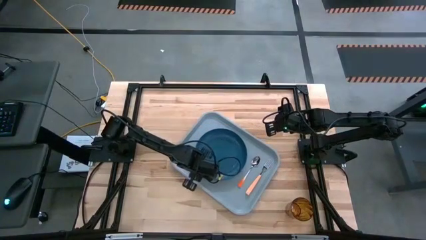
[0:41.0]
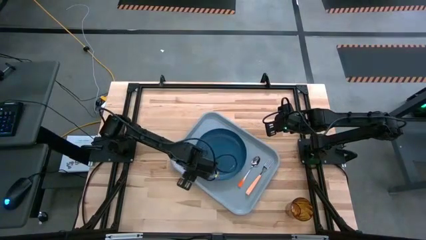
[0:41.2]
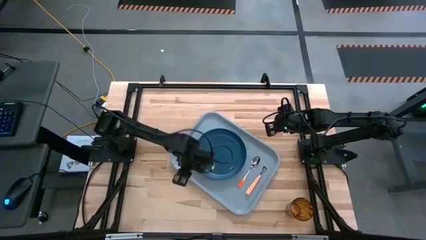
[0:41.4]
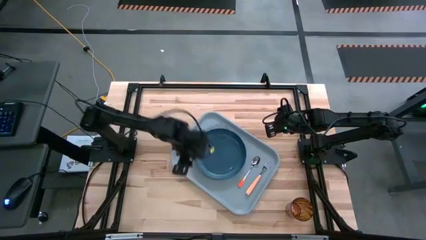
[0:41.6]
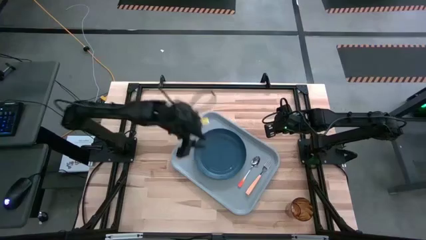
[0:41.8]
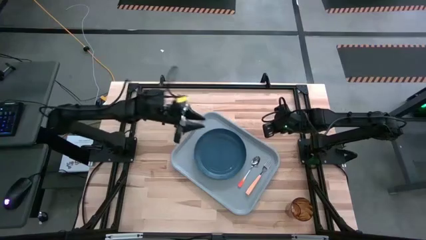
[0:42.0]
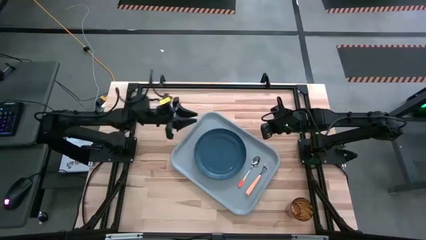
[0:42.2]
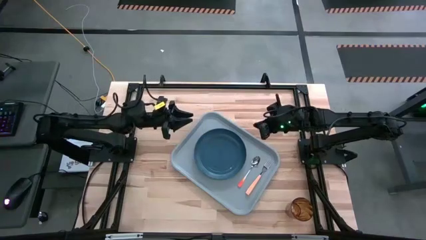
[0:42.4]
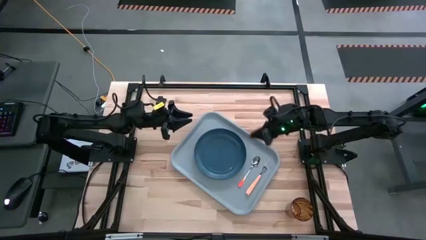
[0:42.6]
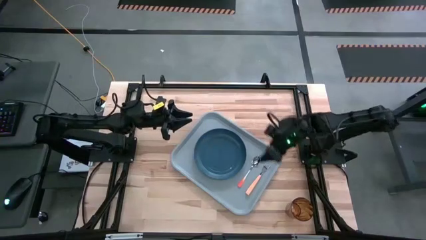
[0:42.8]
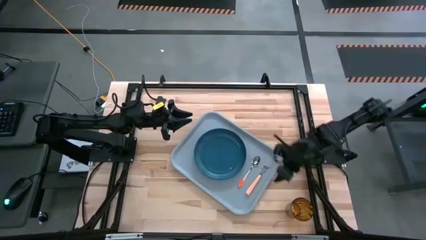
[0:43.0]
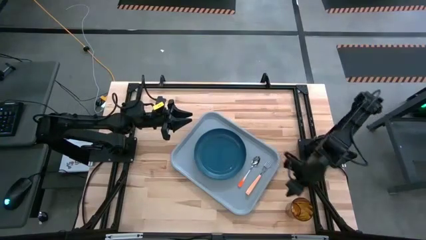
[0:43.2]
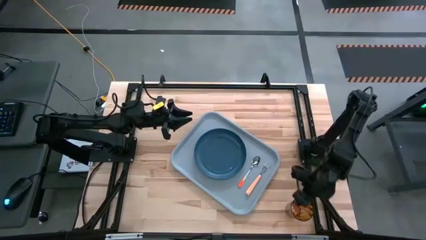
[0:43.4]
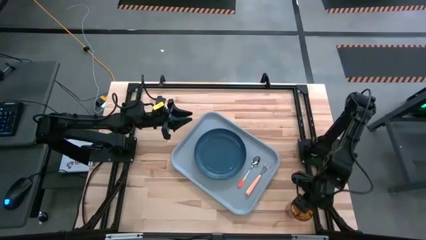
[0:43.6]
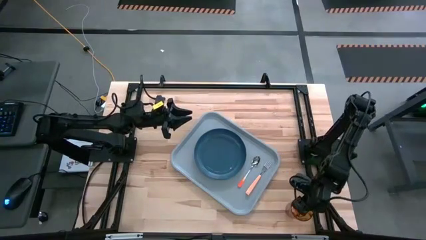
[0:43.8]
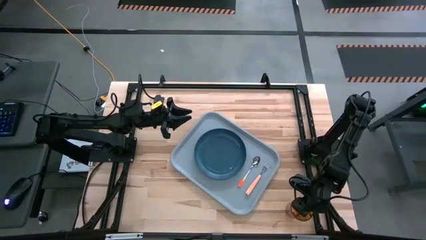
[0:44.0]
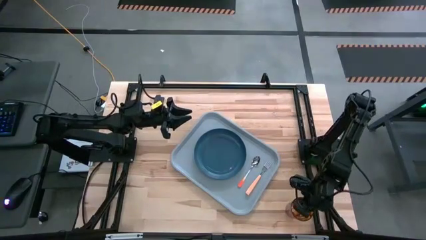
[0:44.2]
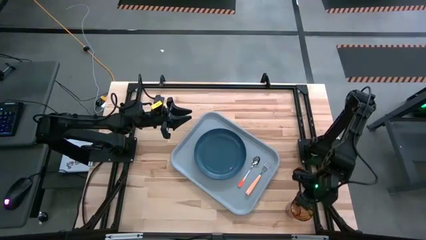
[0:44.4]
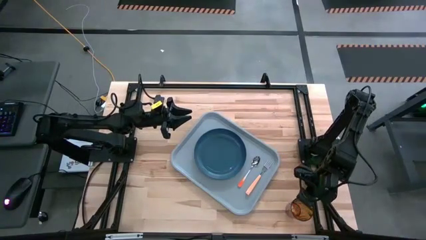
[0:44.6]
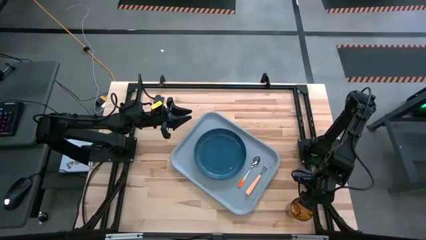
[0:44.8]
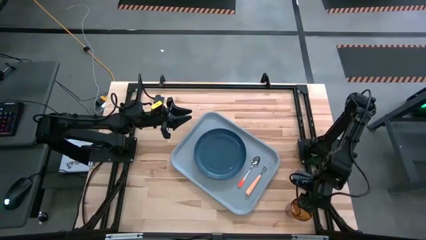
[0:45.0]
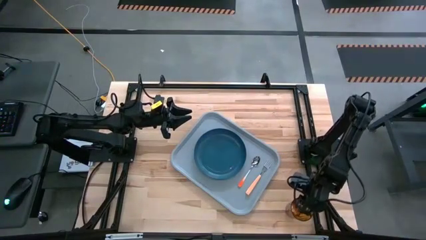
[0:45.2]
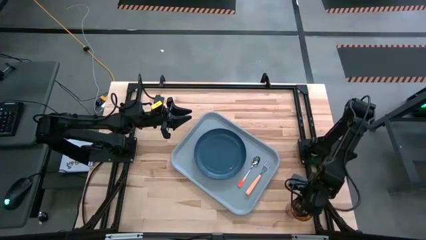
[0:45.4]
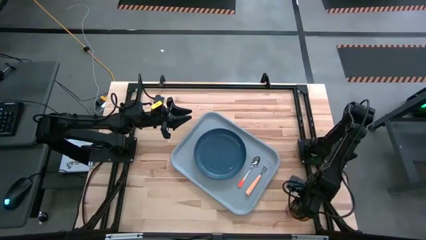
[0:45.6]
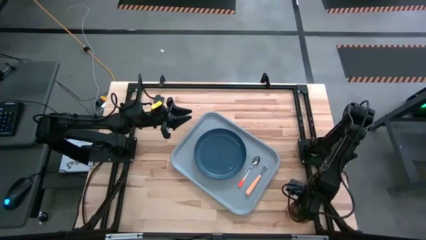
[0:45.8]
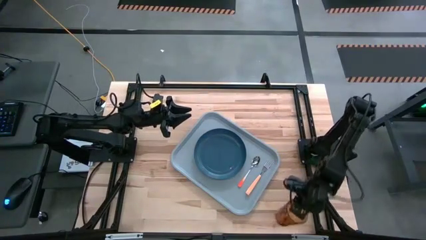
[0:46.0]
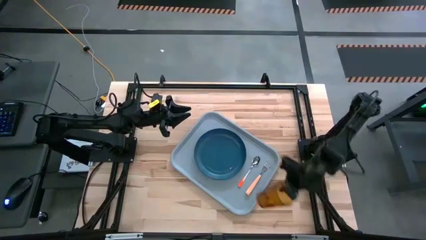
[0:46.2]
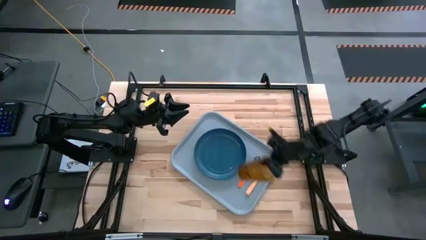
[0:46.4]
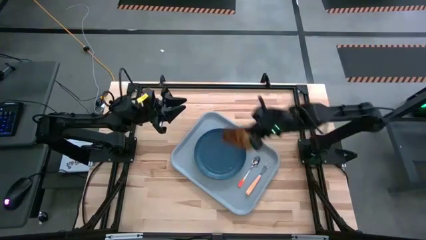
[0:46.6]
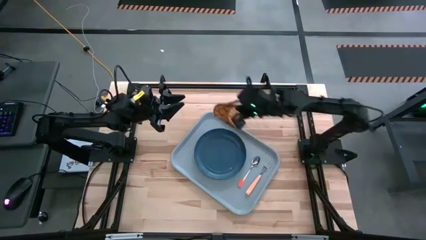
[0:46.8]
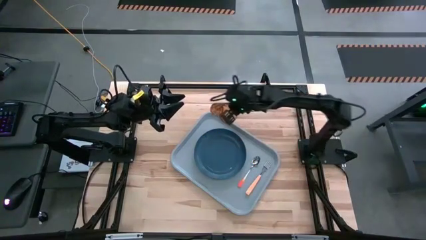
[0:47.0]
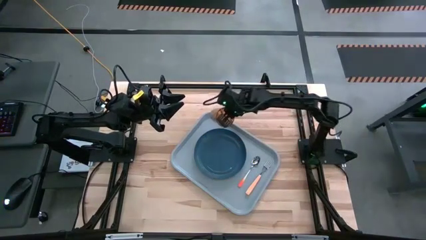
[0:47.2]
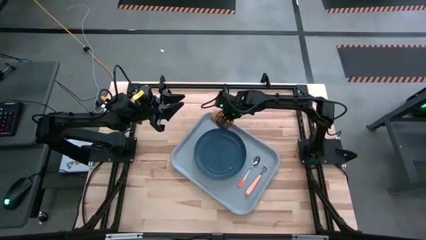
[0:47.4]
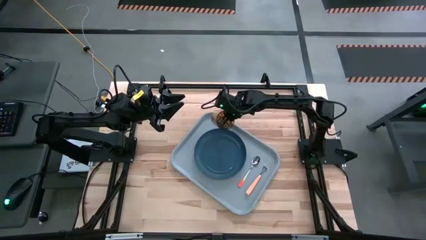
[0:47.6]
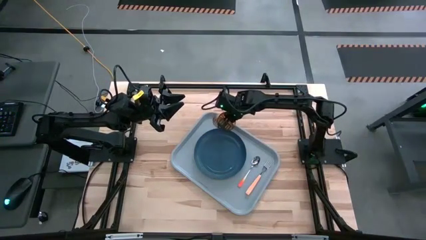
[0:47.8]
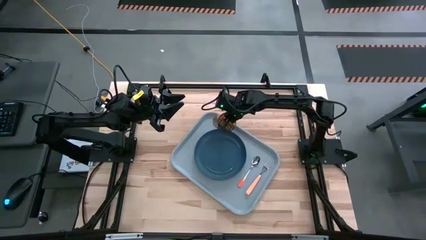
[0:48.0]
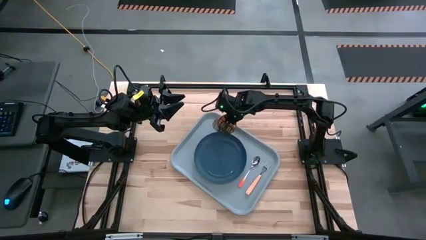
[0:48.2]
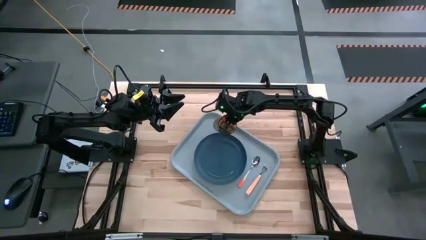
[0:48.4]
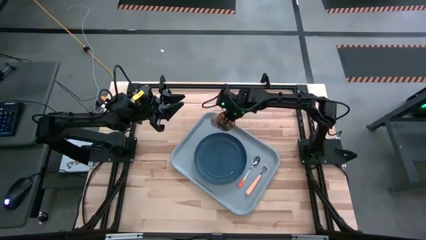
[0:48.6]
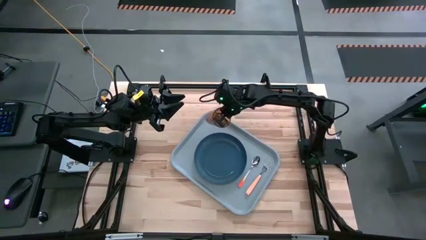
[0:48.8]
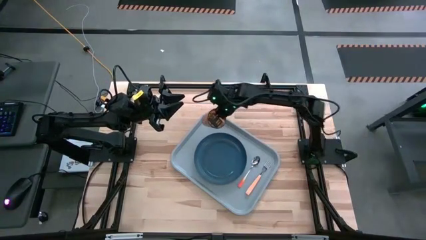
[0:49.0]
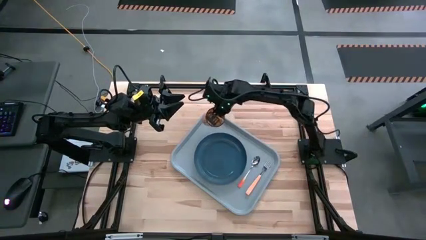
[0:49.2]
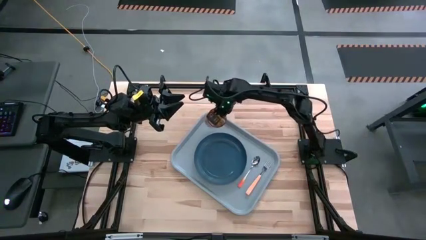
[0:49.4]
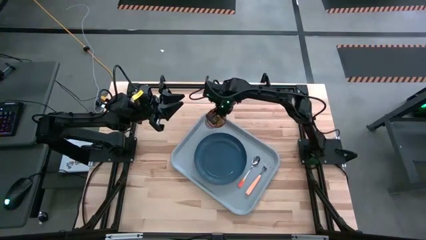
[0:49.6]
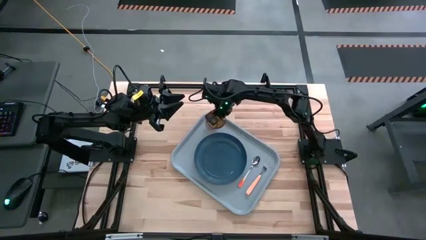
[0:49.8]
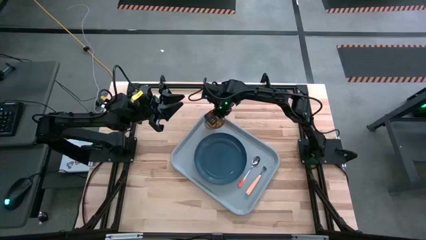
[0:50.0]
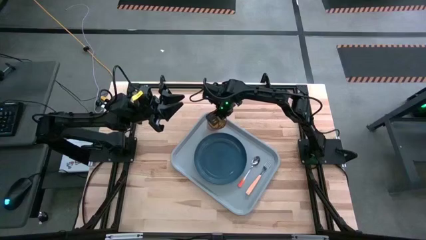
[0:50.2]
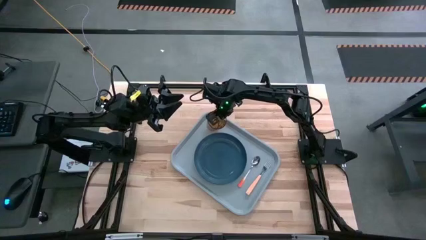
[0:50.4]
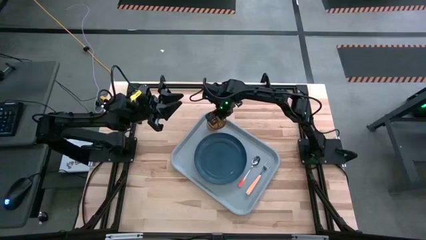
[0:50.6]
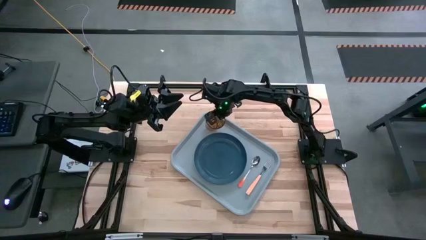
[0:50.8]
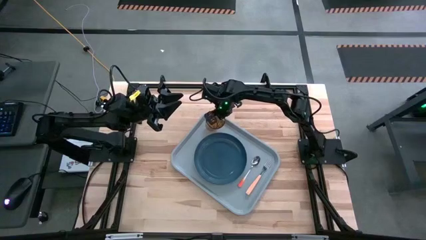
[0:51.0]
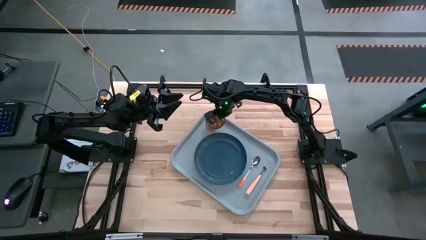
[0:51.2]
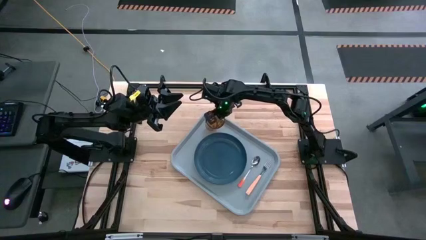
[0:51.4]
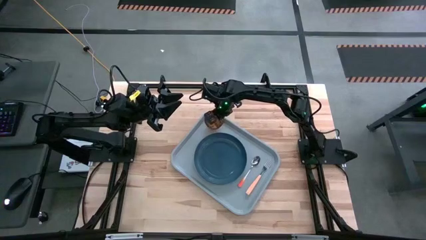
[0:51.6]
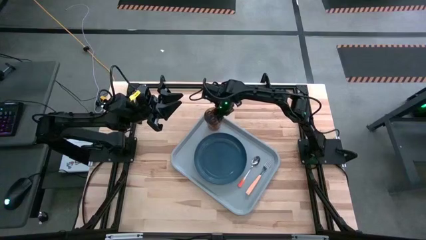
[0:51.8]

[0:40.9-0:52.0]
Task: Pick and place plate/cup/fork/spoon on tray
Put the yellow cup on the gray serving tray to the top left of the blue plate

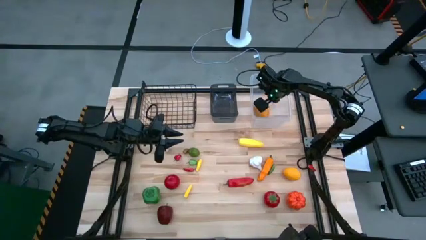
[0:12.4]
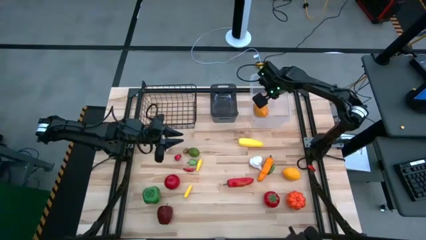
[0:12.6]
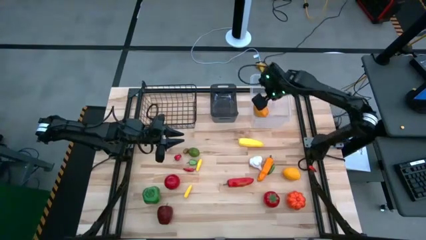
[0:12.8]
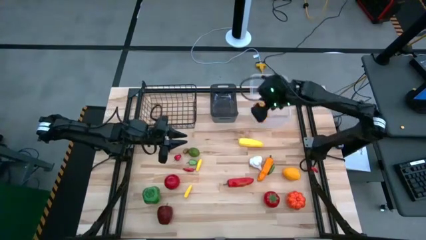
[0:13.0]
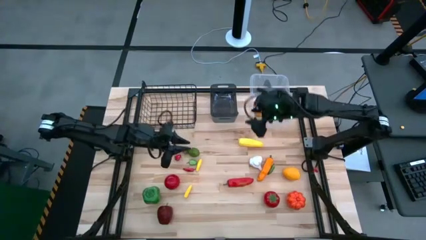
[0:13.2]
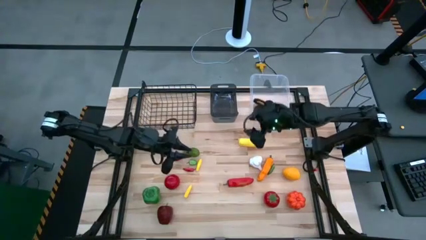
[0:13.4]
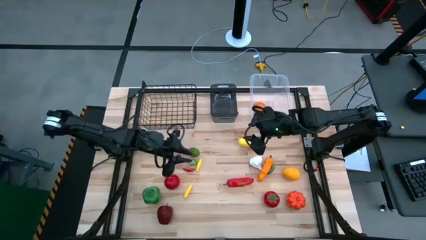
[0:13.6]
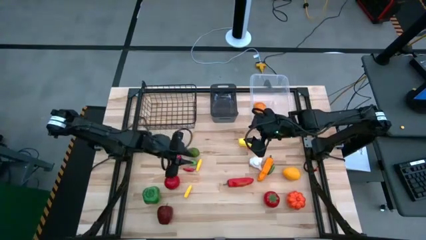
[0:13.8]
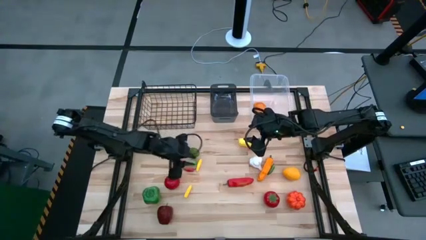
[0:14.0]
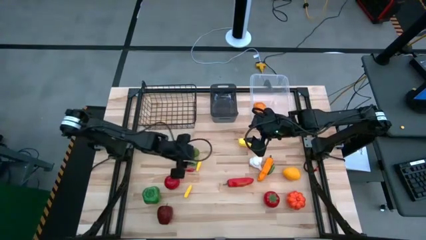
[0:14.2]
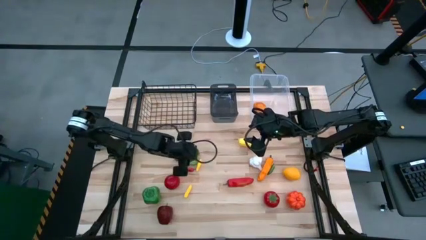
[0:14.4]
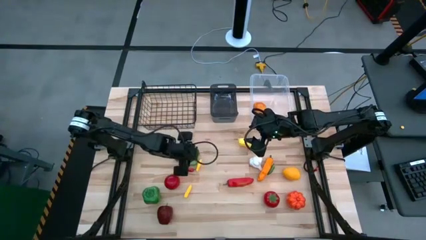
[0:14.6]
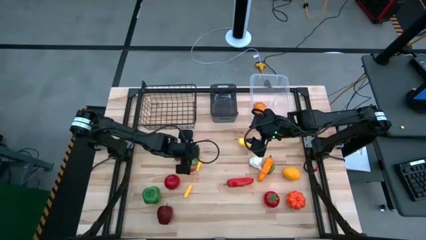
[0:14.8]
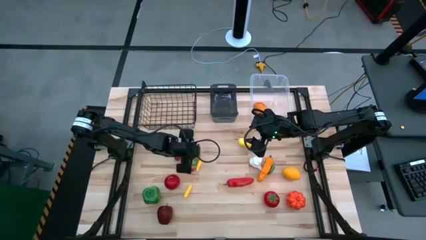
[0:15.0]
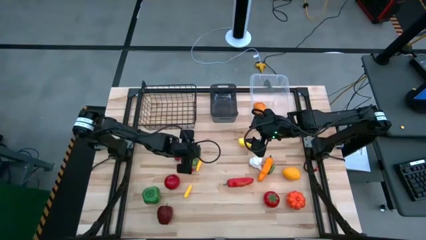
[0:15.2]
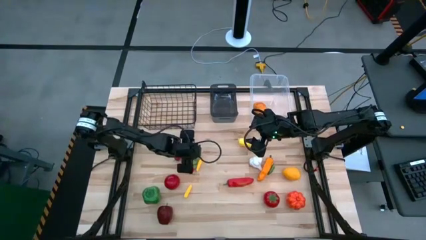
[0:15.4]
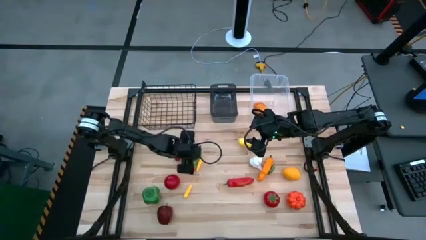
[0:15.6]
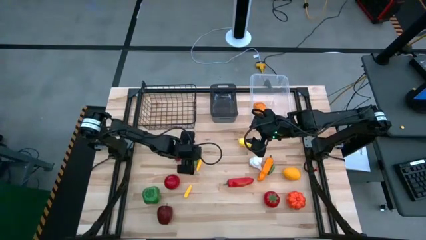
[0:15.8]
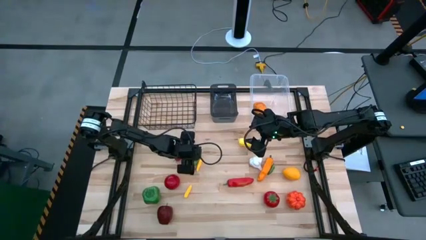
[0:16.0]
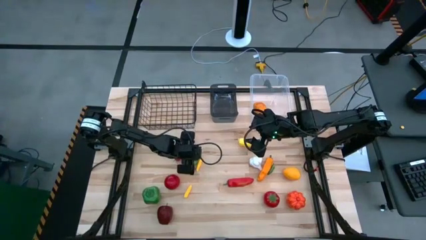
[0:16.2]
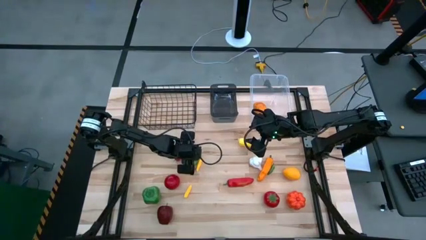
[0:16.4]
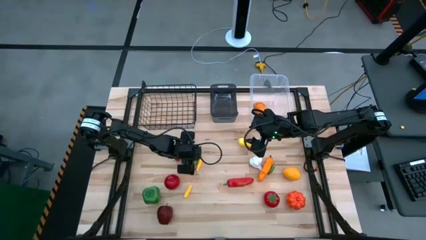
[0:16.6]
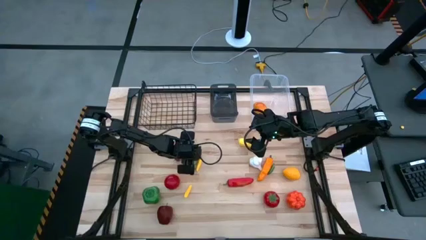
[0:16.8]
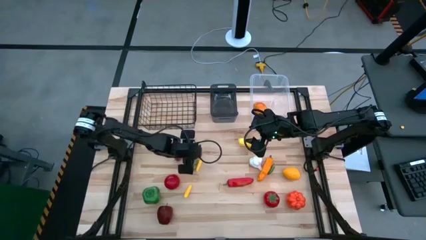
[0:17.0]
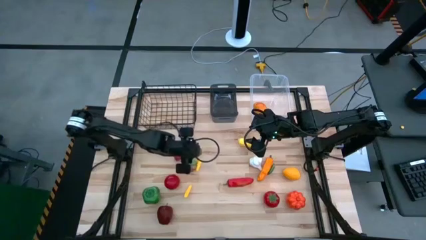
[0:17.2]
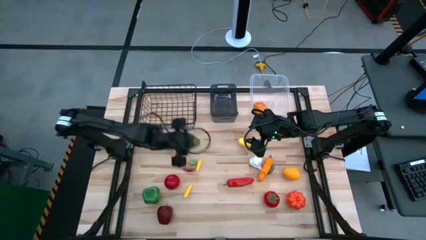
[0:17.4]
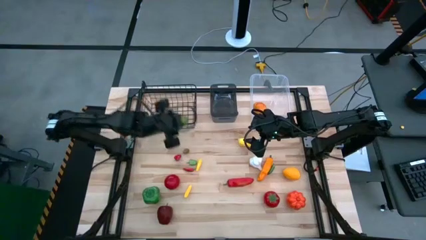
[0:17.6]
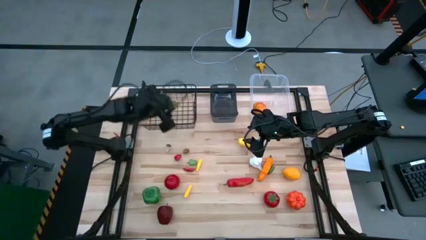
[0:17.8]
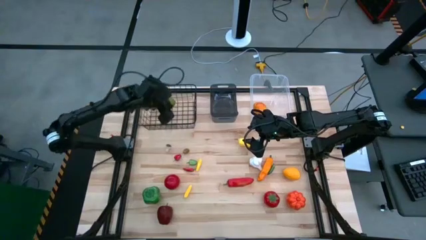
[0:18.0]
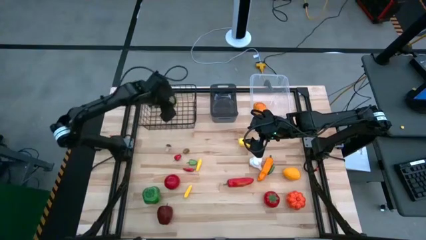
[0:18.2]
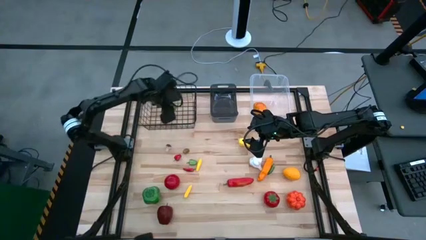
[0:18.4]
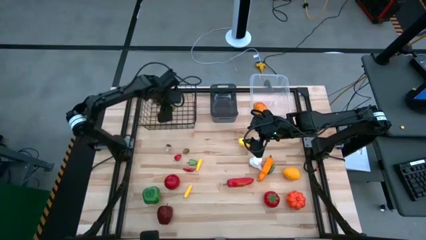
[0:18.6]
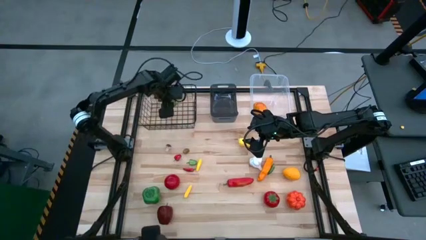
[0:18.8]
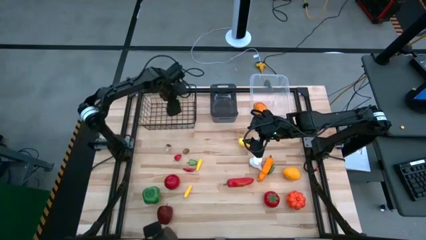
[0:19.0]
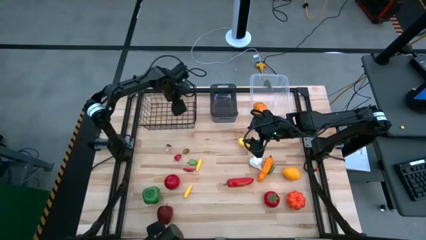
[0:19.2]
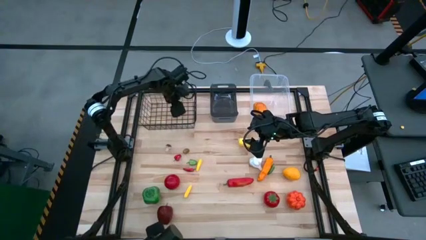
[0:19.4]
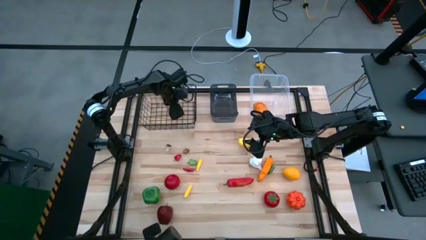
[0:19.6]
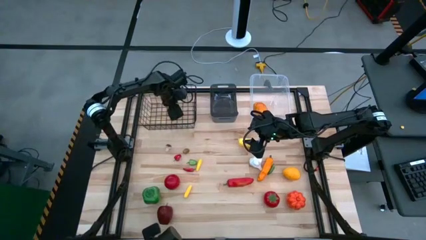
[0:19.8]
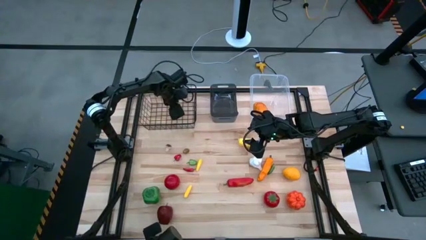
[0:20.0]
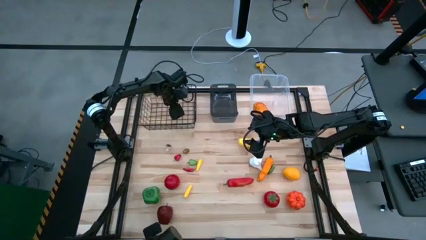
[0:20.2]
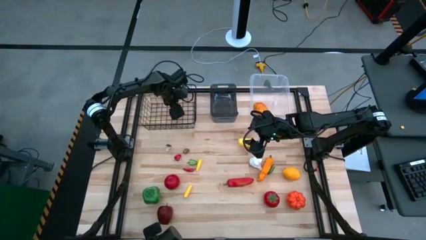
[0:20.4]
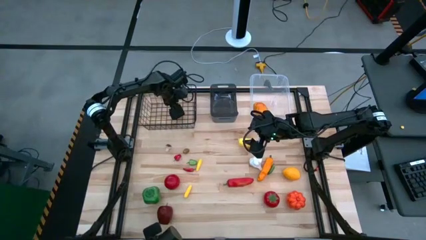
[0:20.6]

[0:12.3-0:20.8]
Task: Sort produce into baskets
Put the green lemon into the black basket
